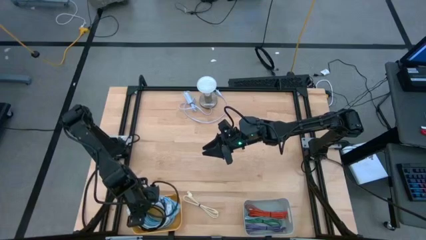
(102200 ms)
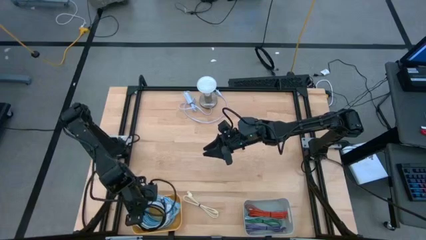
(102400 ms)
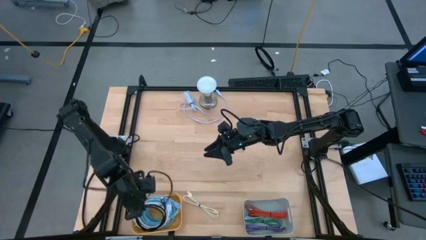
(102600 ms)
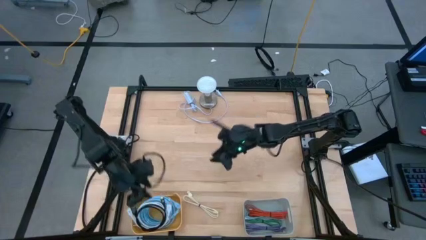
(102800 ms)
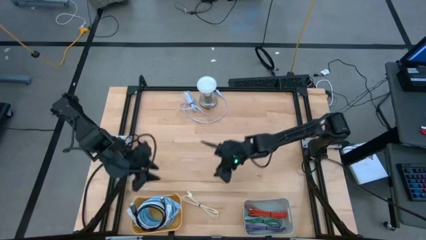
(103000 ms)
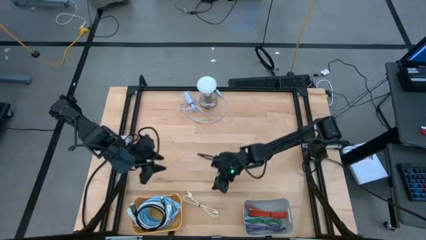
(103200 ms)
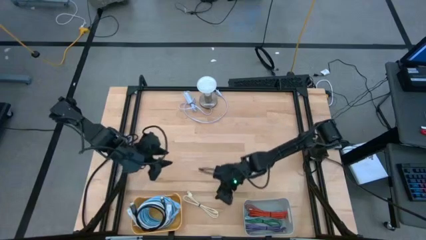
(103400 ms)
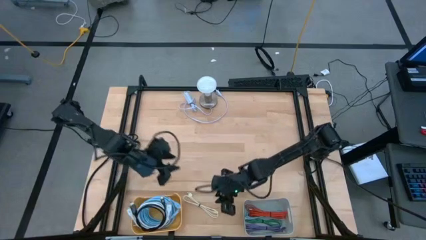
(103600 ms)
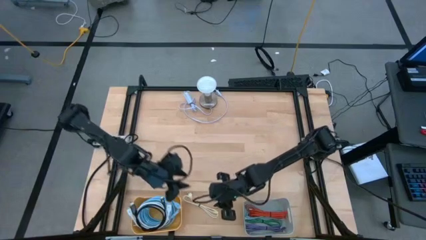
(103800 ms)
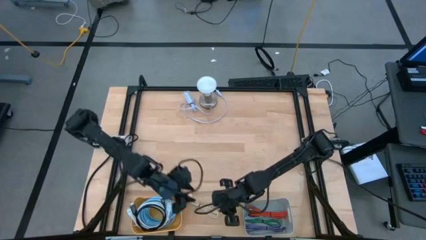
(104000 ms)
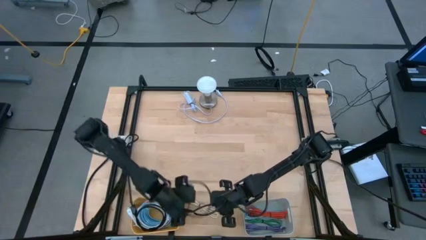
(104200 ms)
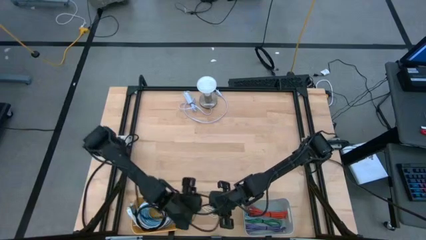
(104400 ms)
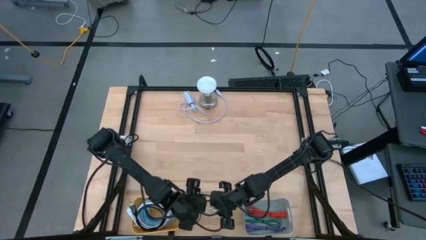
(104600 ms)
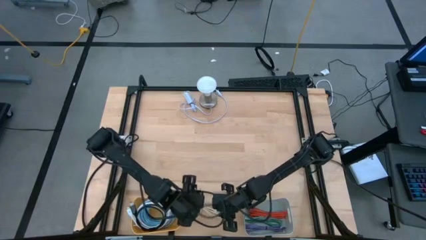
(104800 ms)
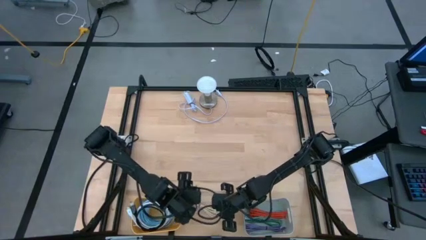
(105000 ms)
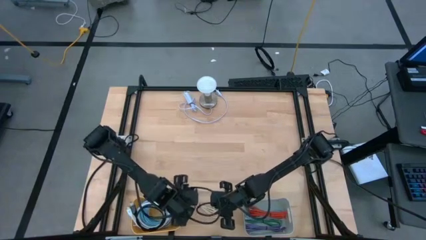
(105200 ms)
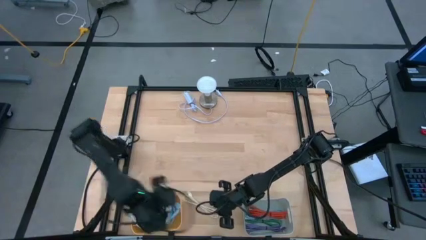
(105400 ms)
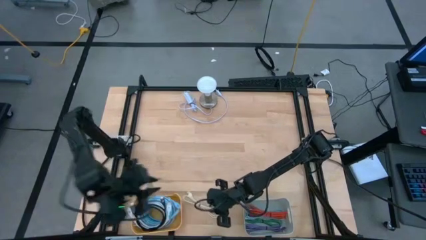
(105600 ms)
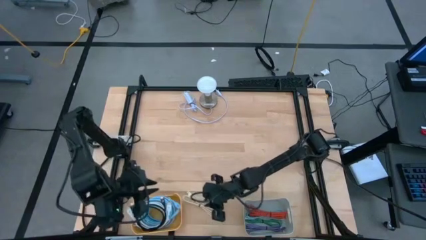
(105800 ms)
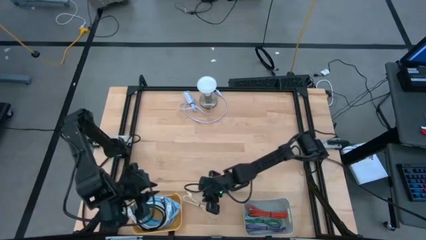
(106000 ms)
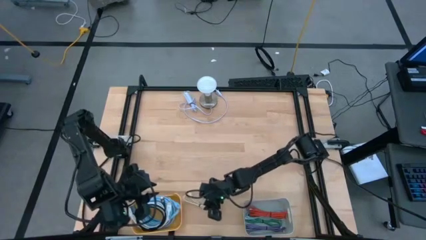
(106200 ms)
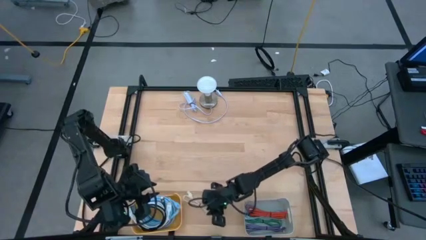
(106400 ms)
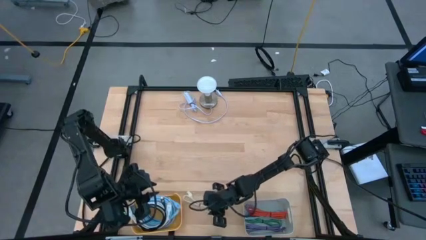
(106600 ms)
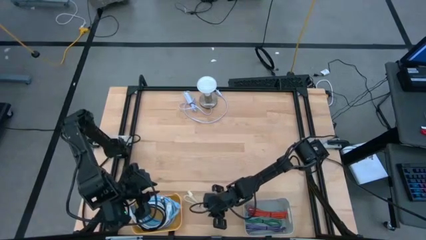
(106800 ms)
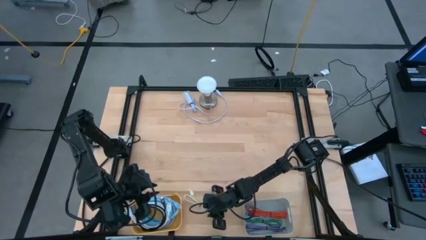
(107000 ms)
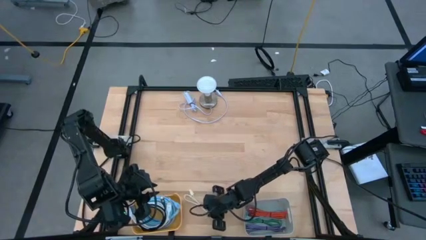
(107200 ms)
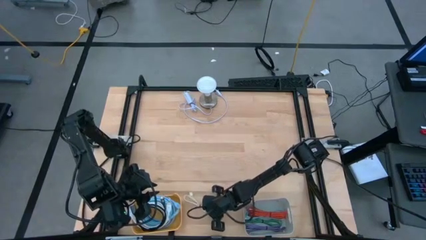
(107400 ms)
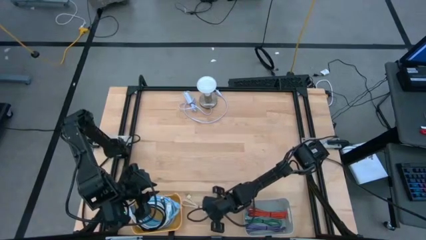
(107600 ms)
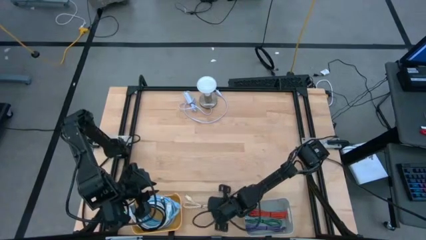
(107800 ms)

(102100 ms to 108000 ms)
Task: Pick & Place USB Port
Put the brown charger cable into the gray bin

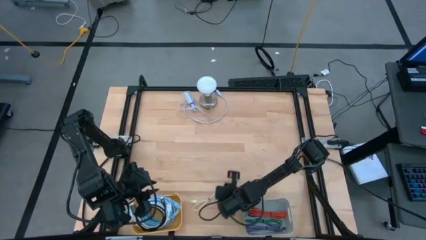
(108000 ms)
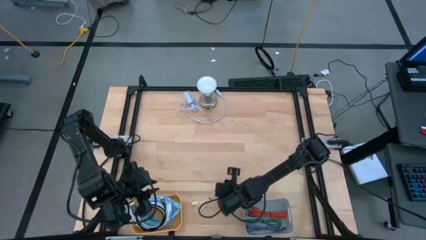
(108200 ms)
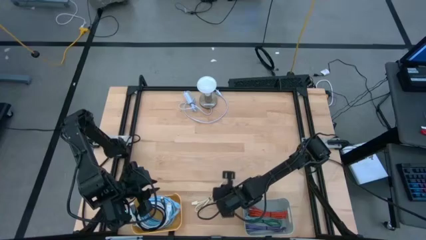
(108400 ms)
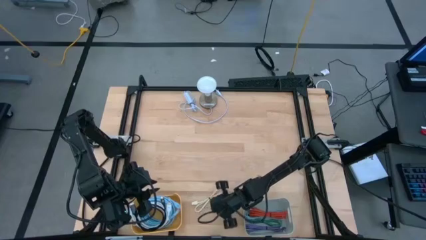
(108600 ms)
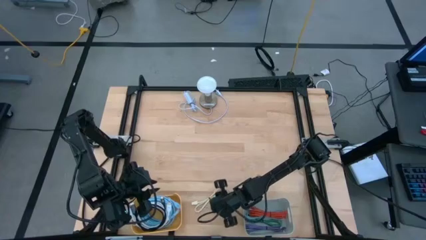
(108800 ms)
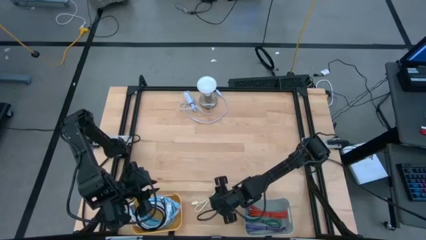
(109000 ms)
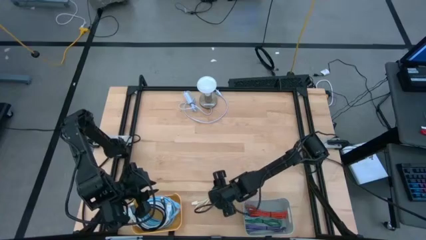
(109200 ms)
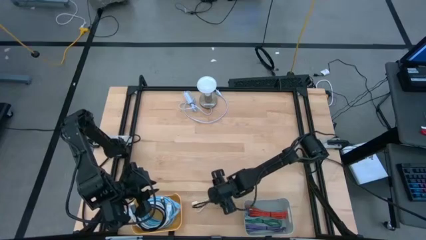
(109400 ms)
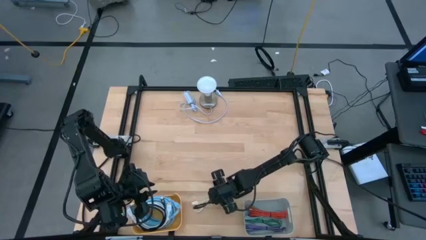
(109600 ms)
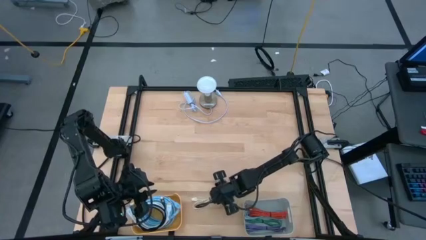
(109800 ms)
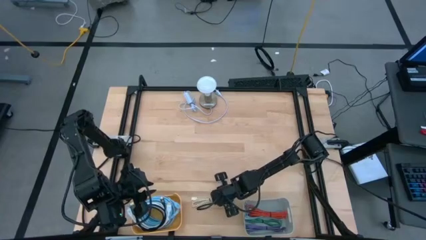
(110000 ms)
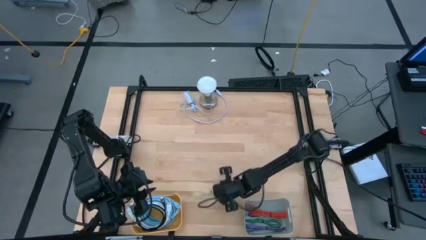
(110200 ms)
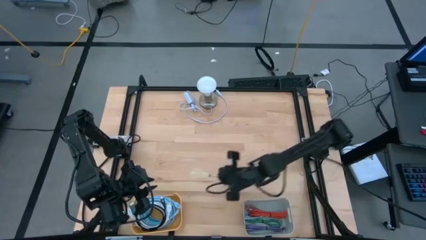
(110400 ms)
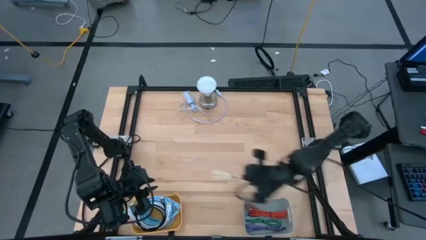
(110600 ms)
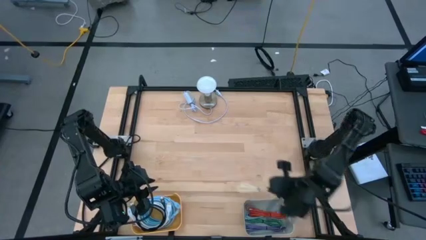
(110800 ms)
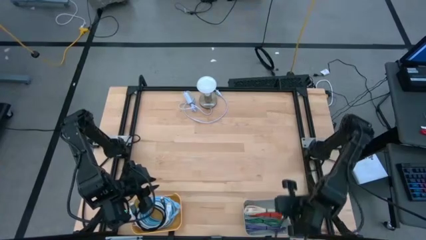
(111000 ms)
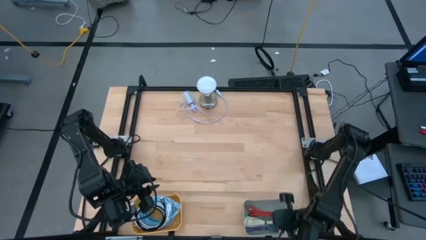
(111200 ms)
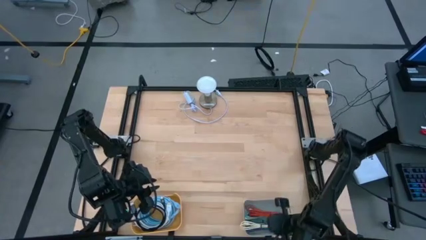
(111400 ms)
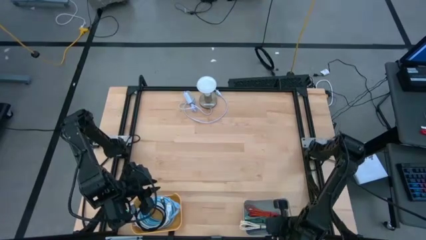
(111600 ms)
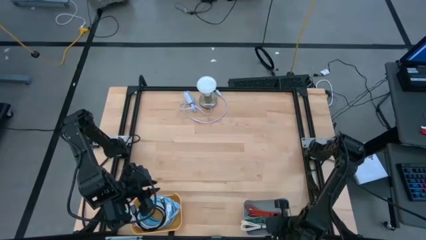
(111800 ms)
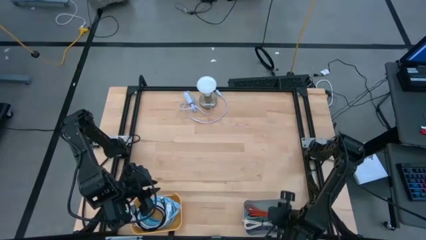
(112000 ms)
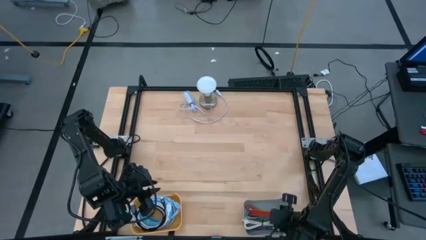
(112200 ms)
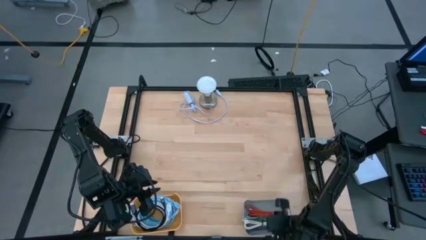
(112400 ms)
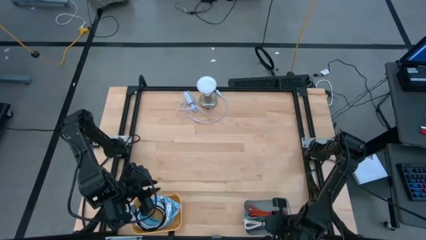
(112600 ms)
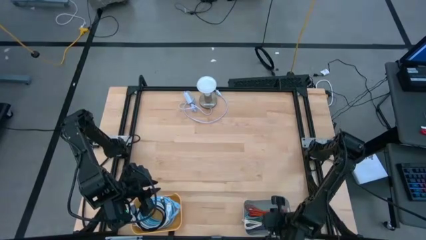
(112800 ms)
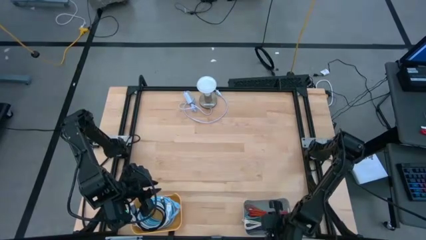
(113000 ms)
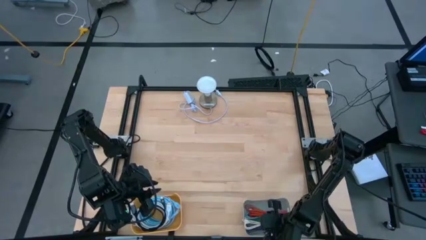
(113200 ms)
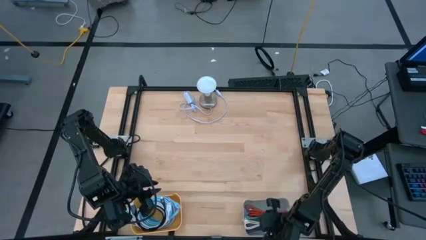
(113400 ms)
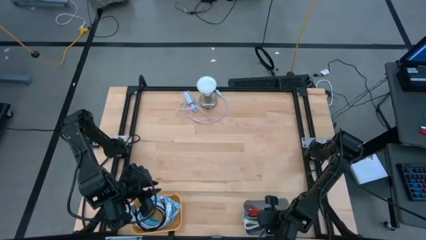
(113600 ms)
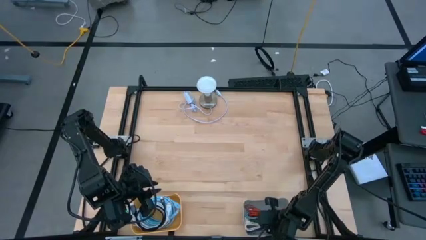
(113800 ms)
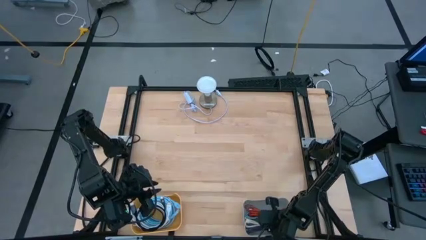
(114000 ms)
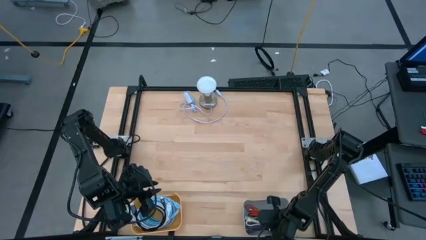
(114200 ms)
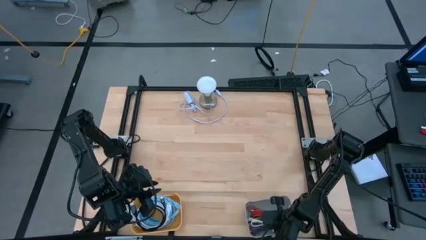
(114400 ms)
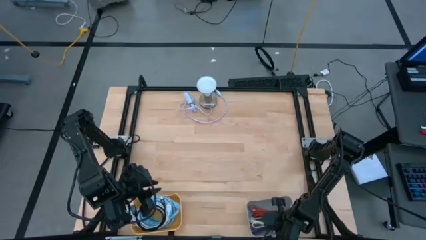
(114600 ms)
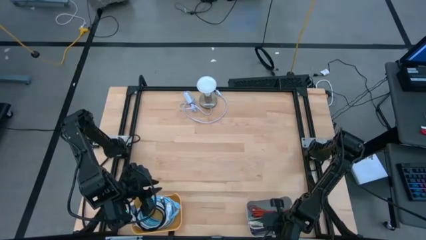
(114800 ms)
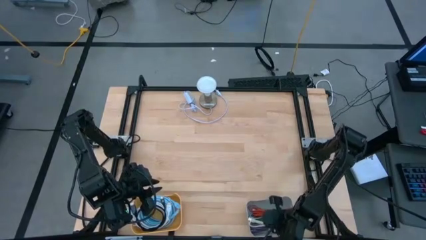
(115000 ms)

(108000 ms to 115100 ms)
Put the brown charger cable into the gray bin

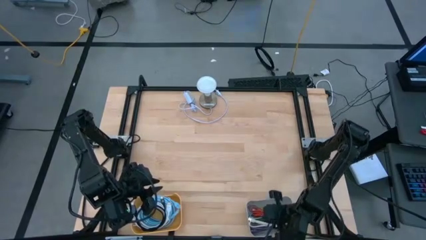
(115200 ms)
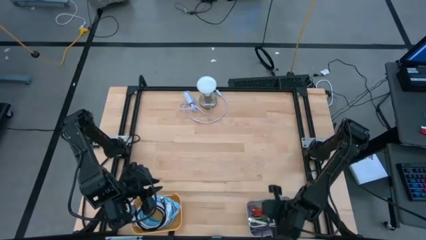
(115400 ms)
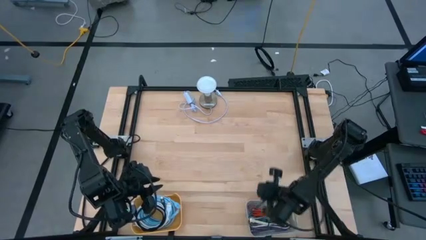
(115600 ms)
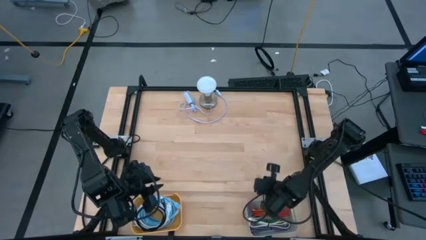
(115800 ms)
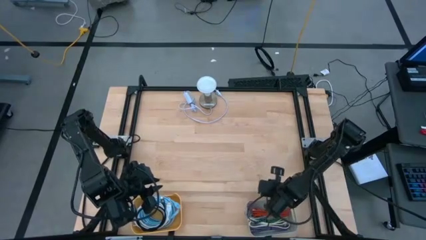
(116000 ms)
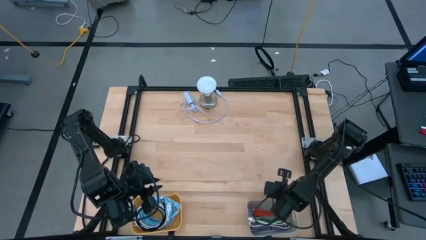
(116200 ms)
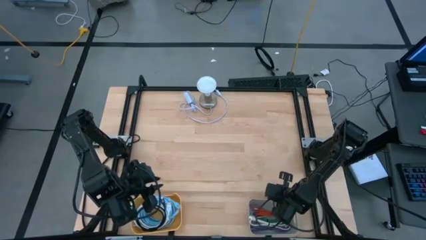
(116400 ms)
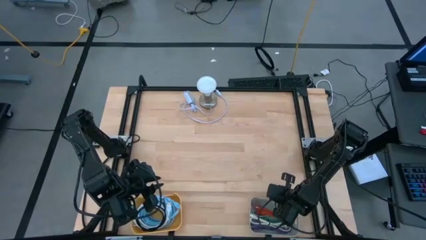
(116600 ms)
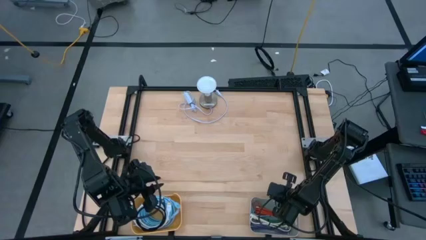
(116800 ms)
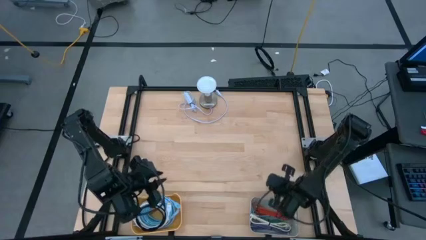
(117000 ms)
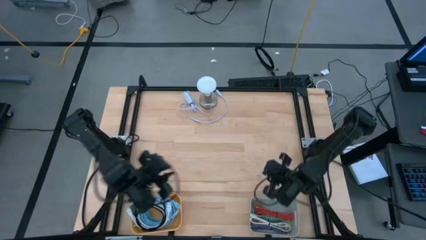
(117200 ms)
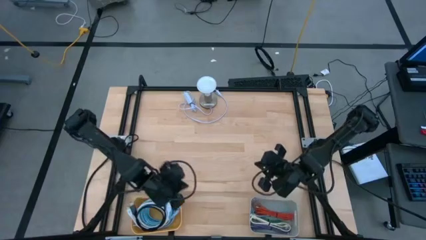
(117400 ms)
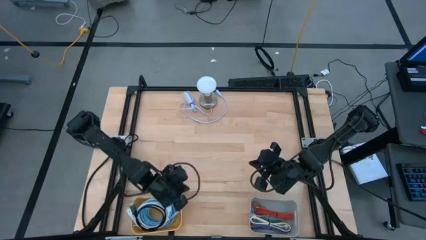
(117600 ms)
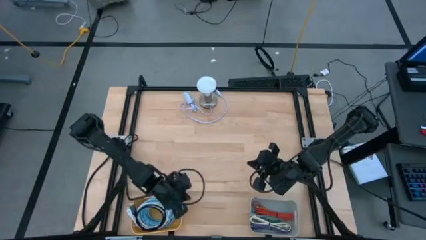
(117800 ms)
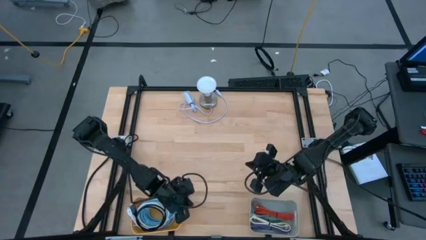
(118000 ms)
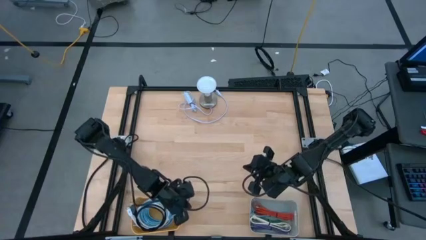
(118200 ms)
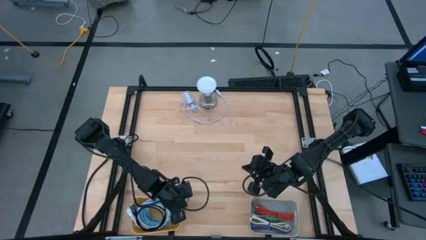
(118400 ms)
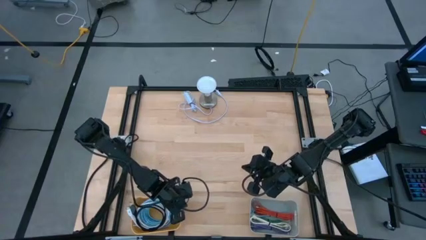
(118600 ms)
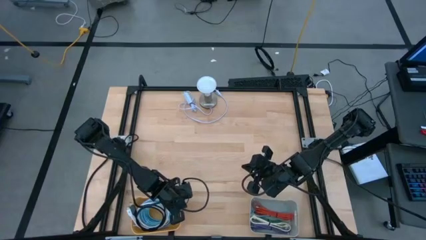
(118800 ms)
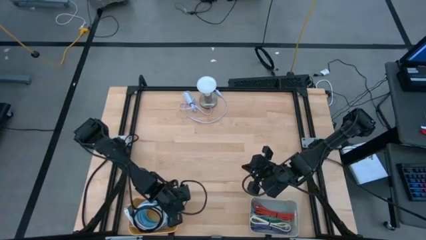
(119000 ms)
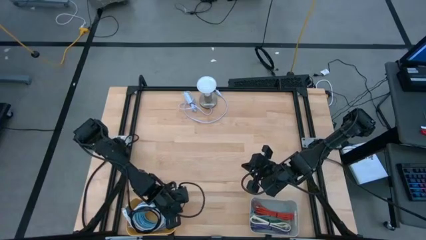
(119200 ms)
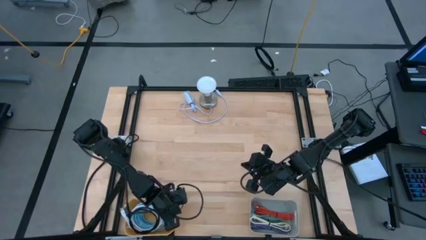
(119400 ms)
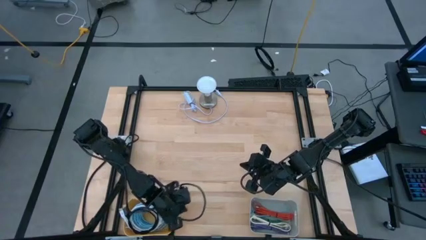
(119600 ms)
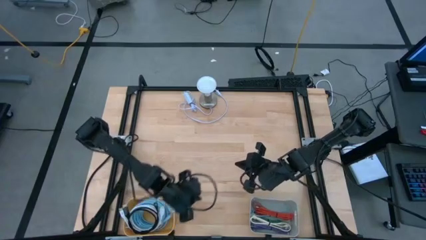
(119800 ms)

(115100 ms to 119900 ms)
Adjust the bins
